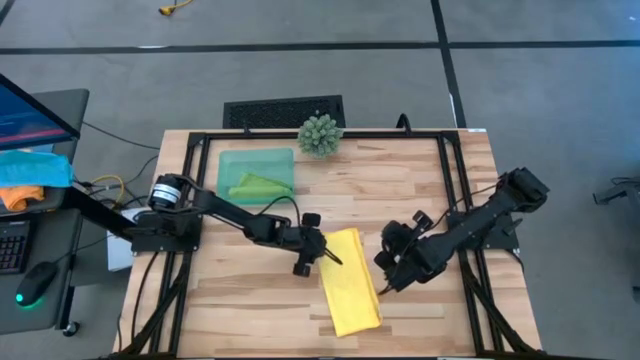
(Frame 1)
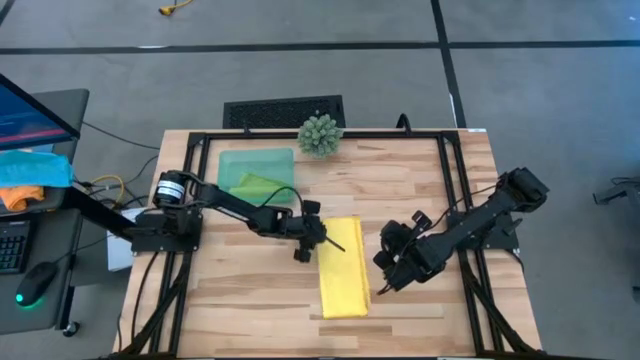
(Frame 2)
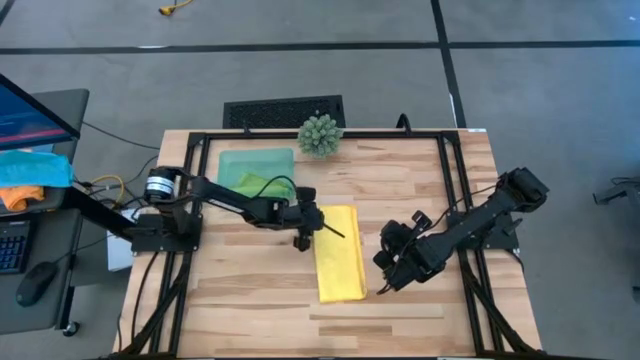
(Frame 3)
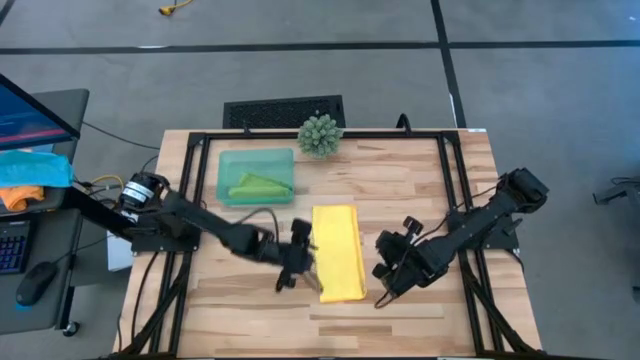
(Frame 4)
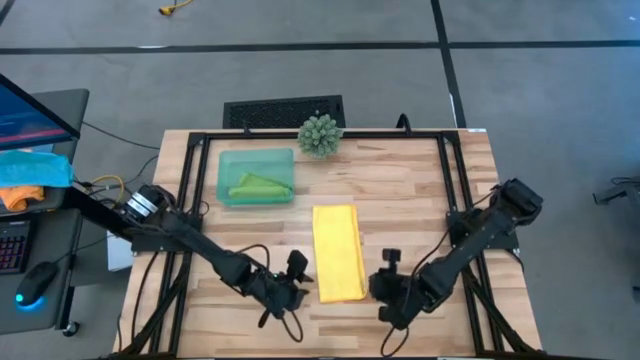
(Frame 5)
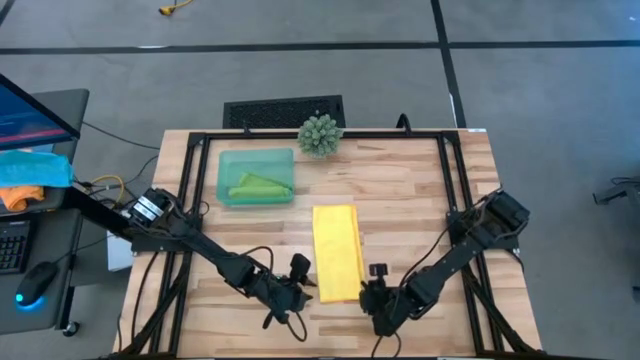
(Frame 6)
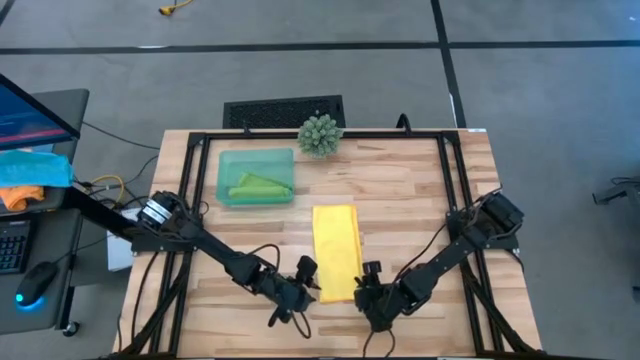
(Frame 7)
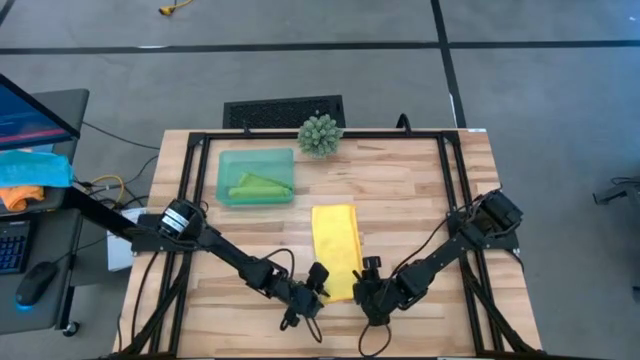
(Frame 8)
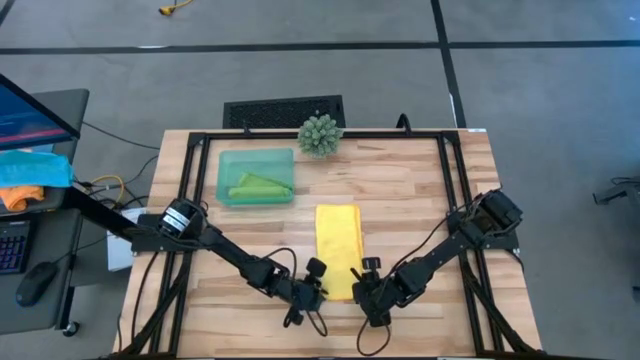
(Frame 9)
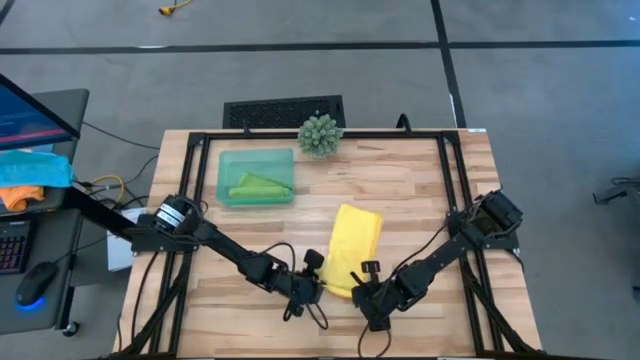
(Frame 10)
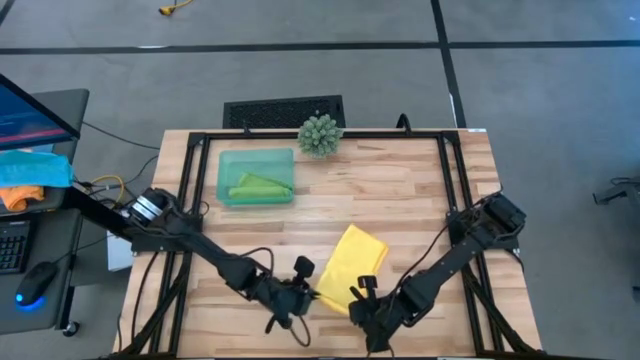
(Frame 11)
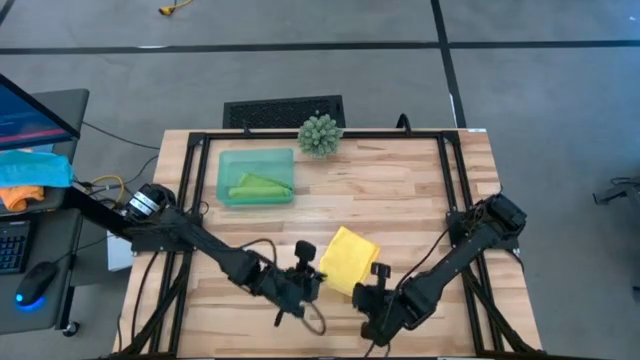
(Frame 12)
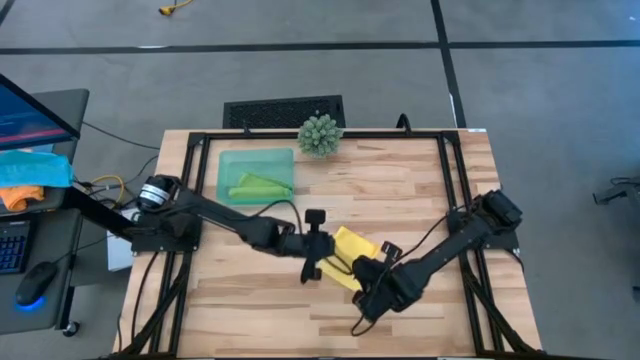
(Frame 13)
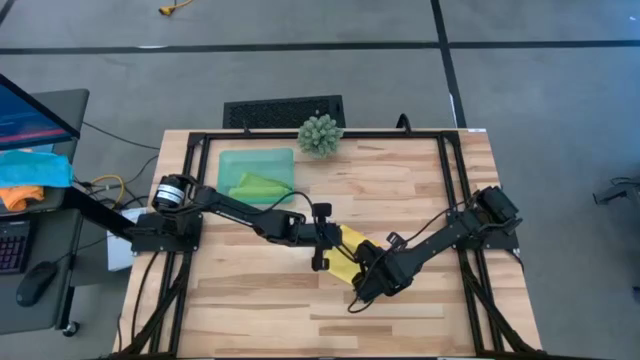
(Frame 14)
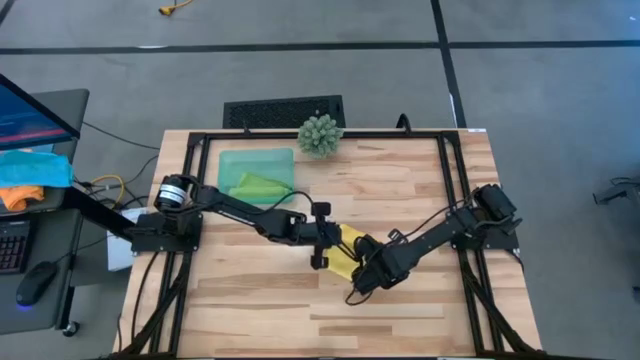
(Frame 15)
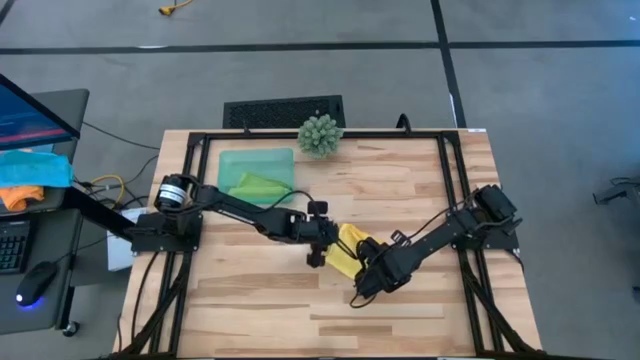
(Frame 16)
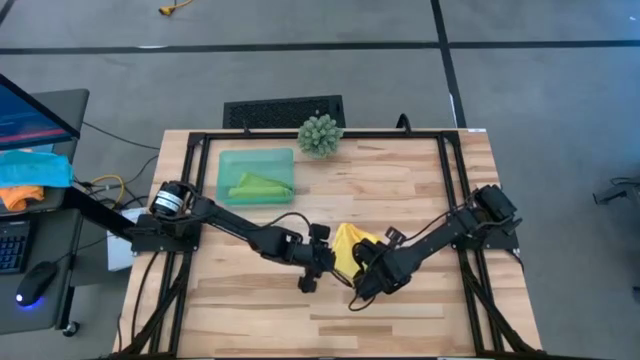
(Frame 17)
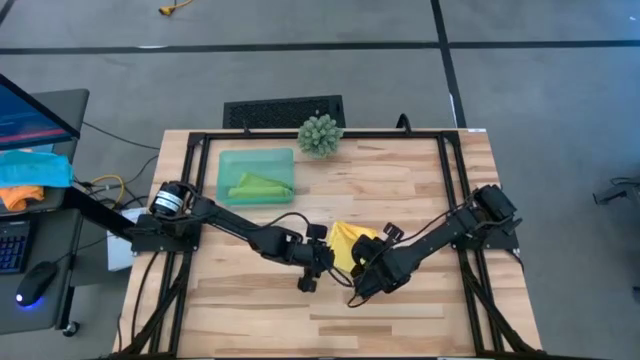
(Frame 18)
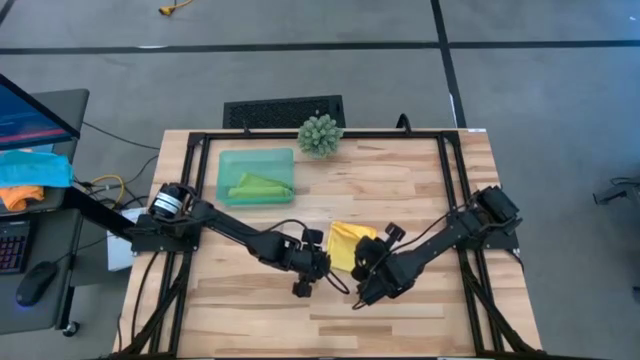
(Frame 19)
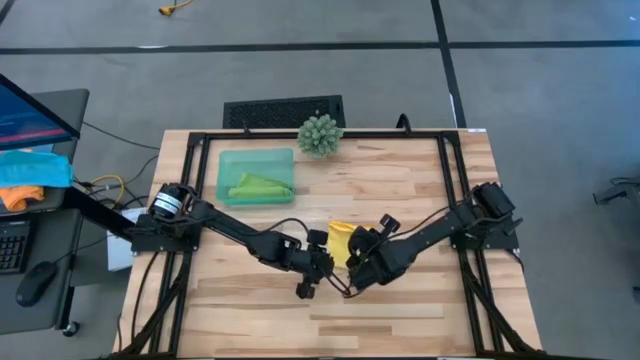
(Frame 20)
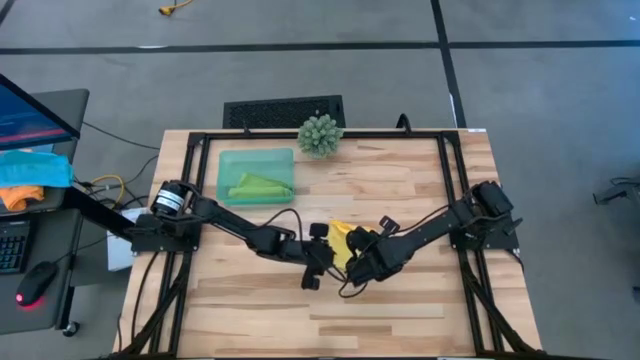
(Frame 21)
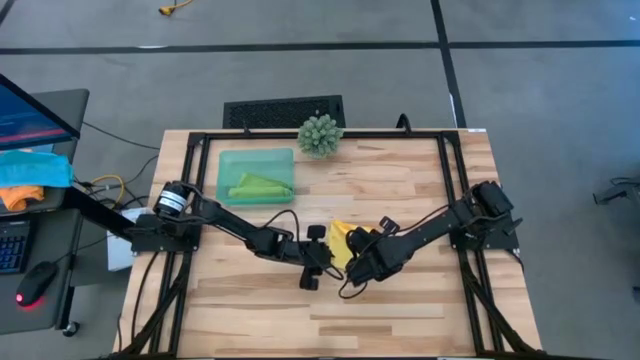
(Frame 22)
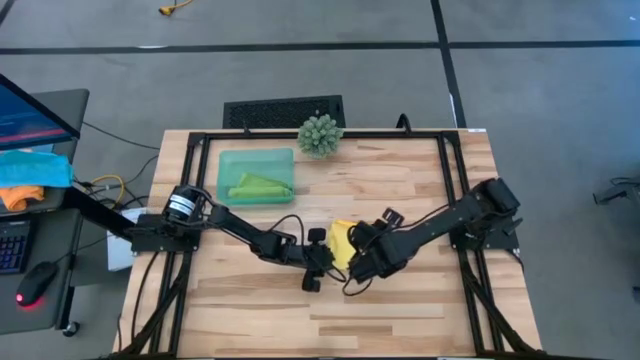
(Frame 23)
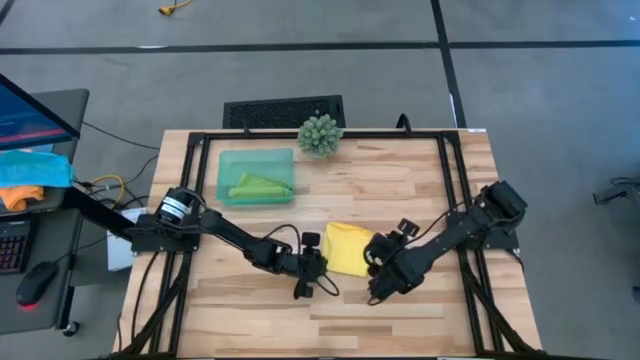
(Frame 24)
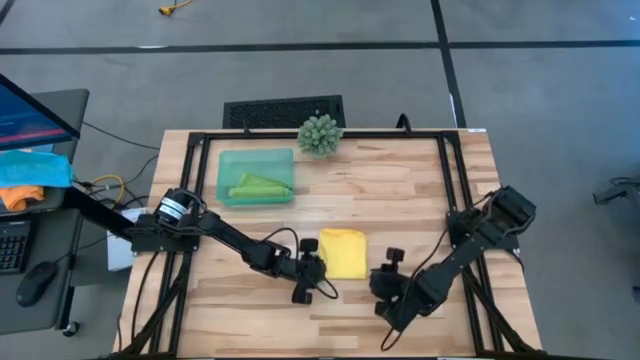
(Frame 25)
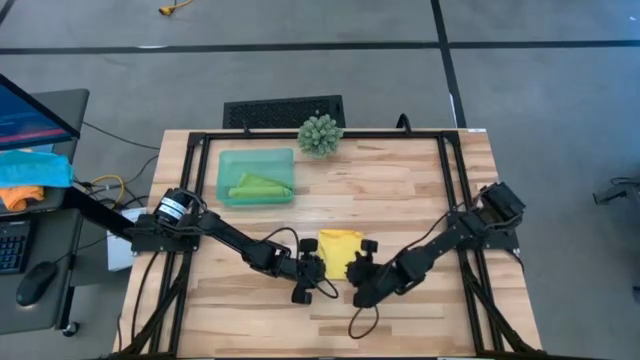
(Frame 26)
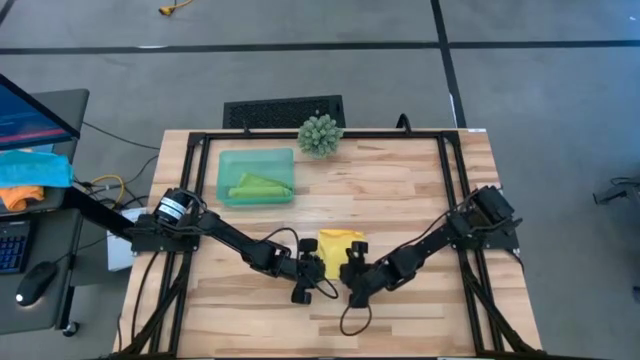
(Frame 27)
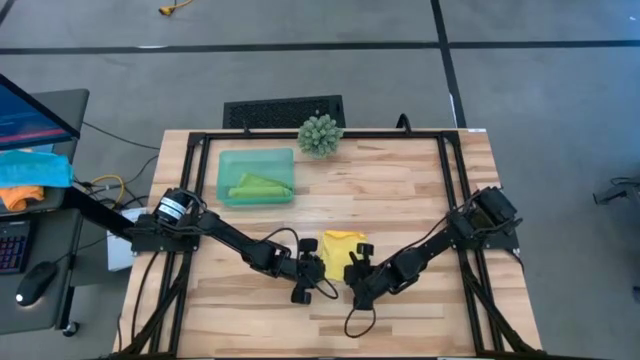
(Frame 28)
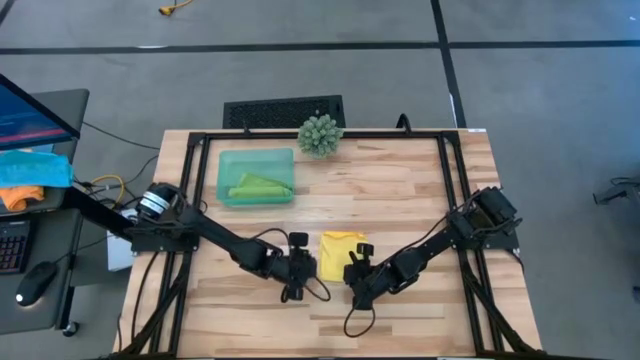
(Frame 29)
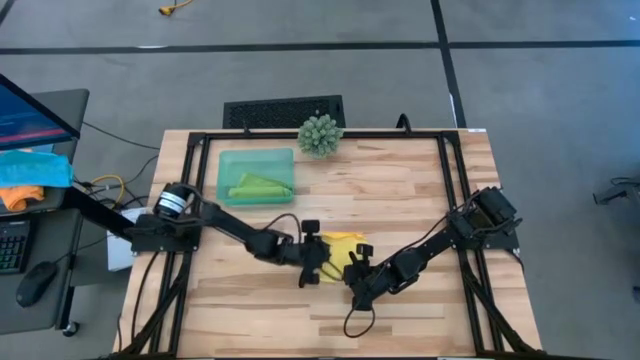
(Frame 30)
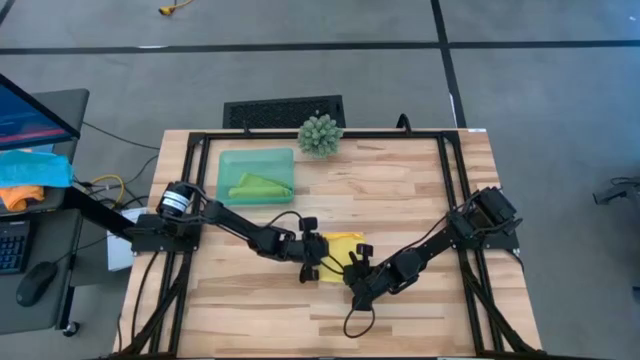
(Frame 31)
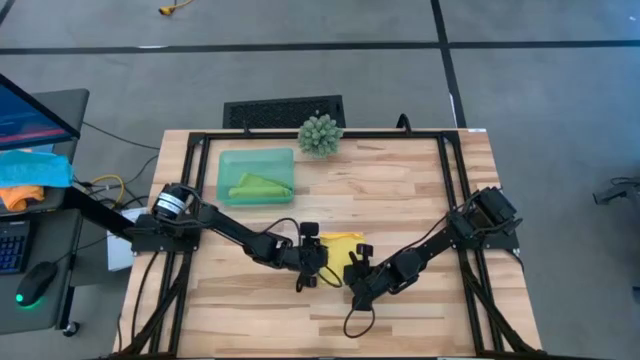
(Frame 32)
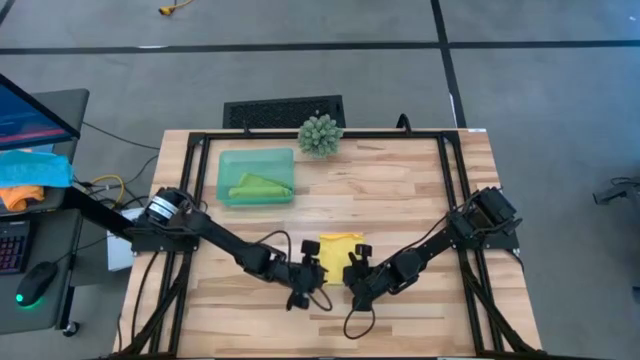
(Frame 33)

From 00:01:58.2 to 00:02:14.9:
Task: Roll microfiber towels into tight, uniform cylinder then place into a basket
Fold the yellow towel

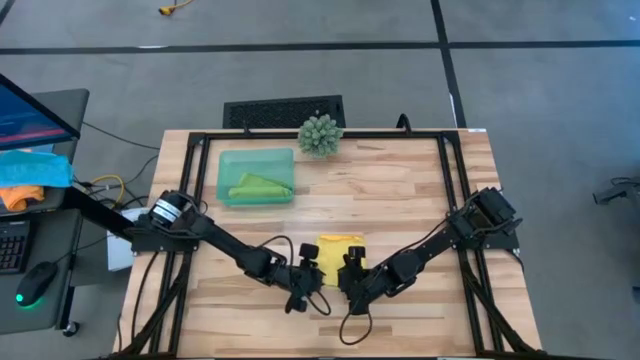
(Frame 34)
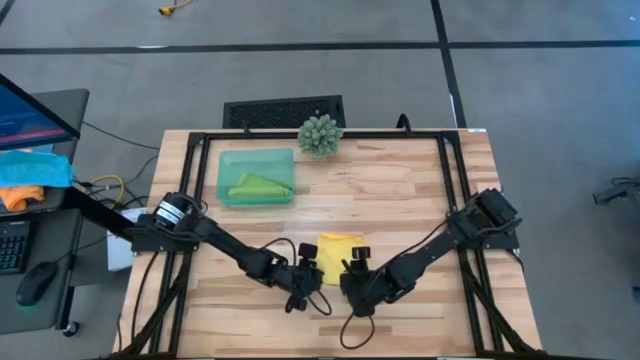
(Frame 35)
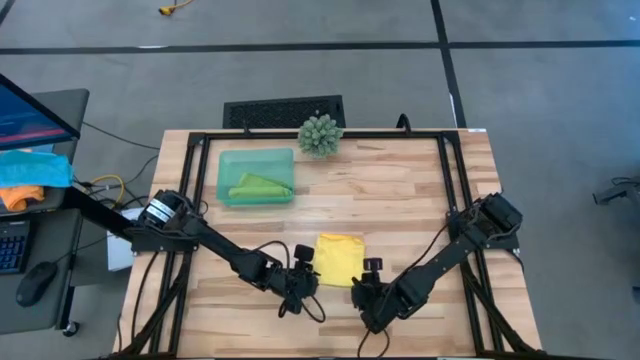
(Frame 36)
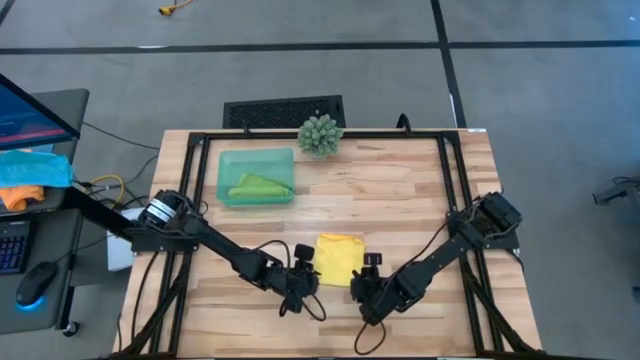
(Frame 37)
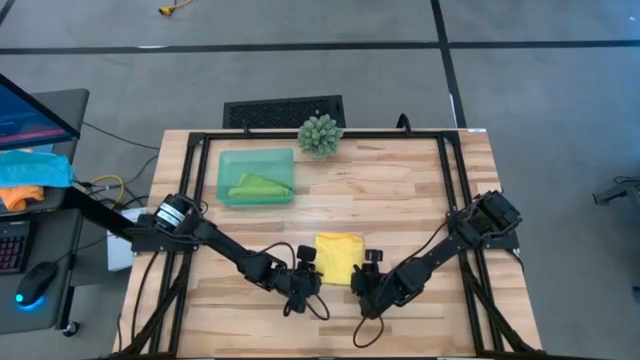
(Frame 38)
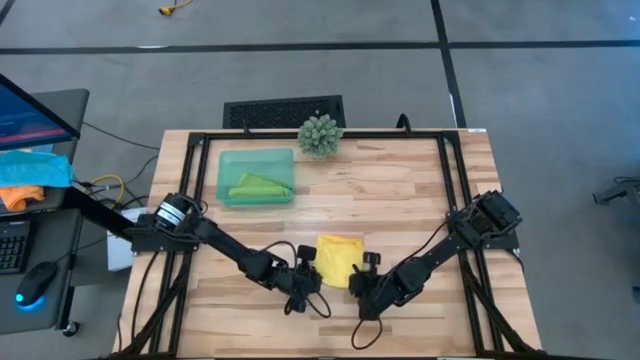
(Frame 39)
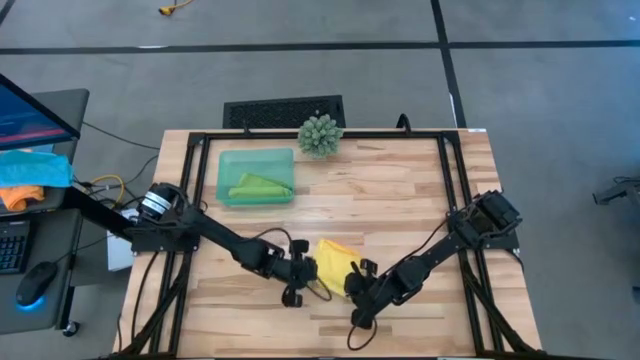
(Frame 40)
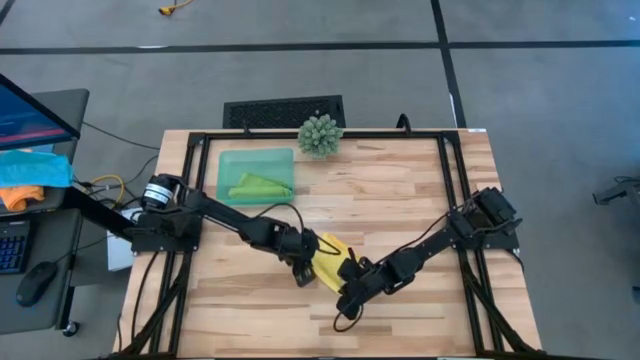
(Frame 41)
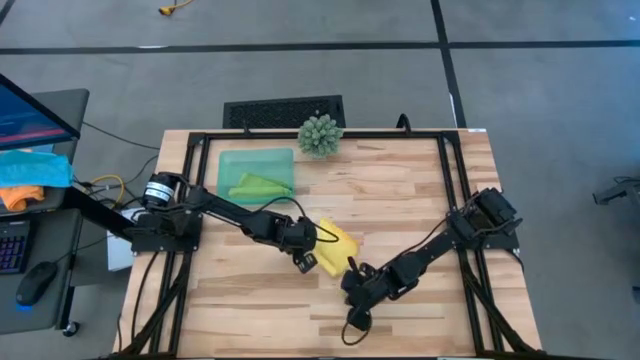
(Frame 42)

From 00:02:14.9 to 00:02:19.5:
Roll the yellow towel

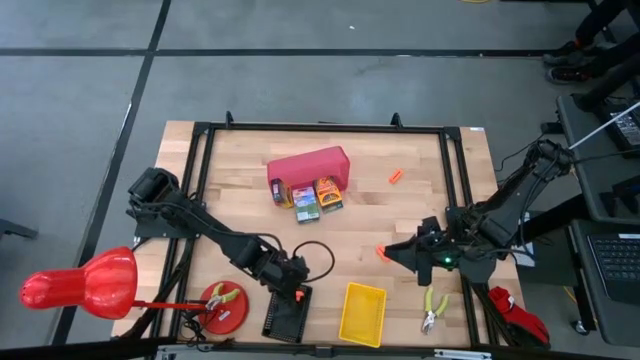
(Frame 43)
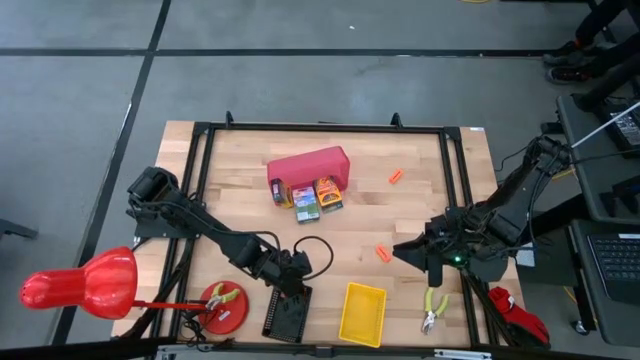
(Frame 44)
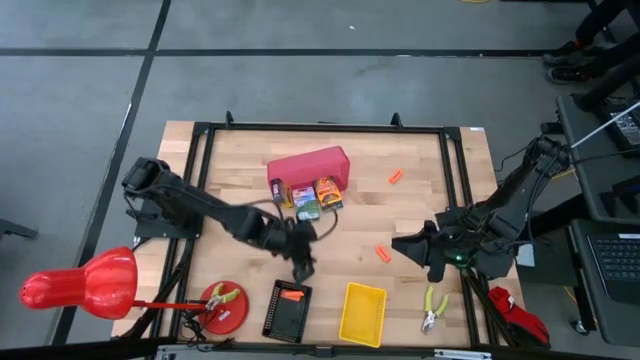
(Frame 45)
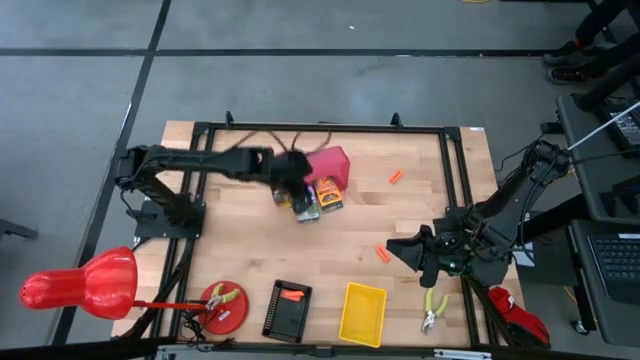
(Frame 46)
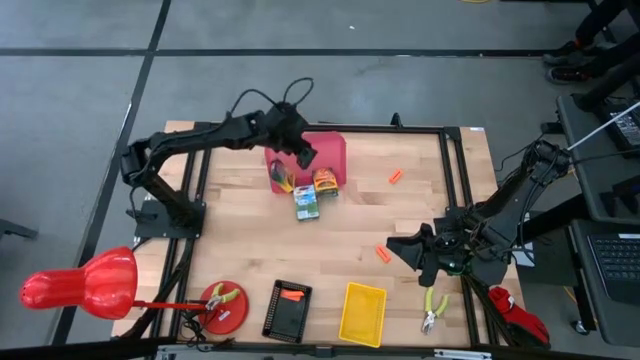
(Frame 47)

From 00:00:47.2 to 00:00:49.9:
Task: Pick & Place School Supplies
Adjust the red bin
